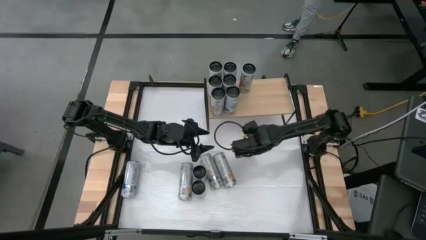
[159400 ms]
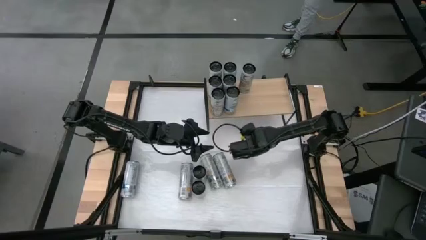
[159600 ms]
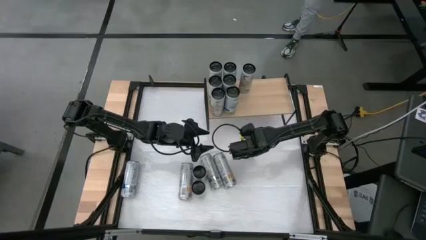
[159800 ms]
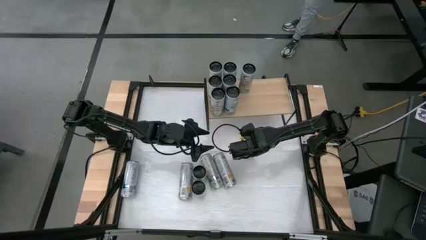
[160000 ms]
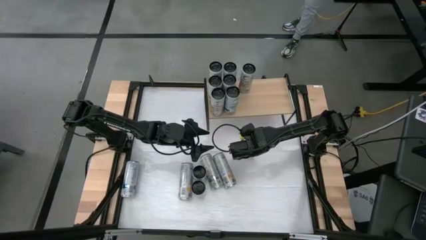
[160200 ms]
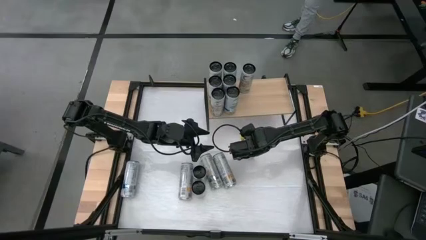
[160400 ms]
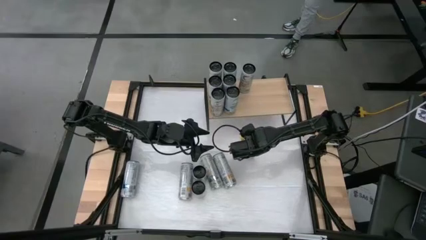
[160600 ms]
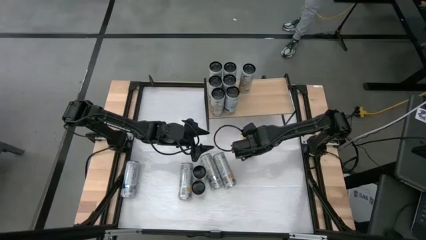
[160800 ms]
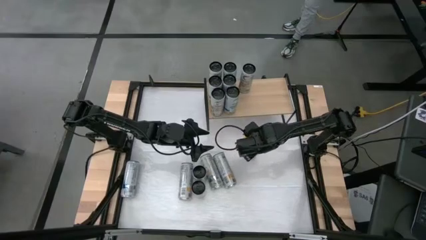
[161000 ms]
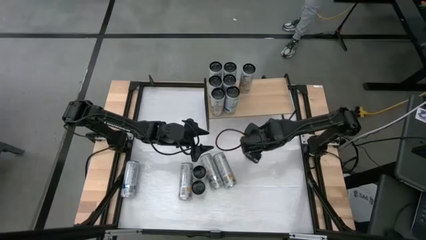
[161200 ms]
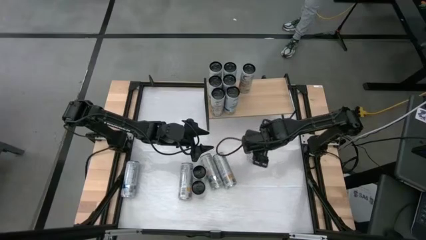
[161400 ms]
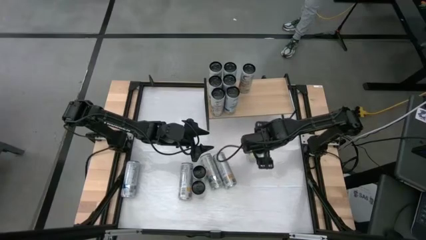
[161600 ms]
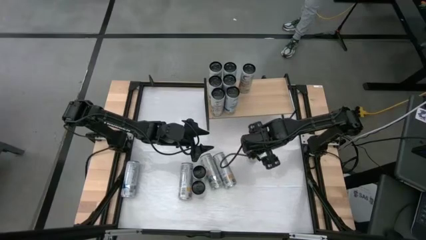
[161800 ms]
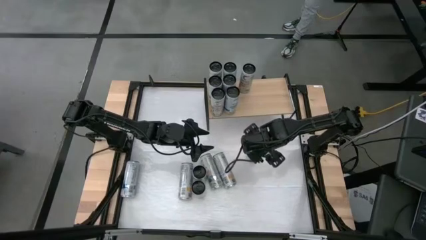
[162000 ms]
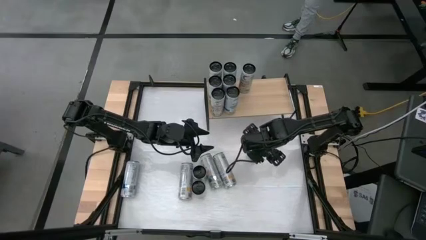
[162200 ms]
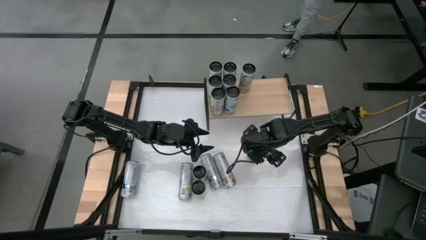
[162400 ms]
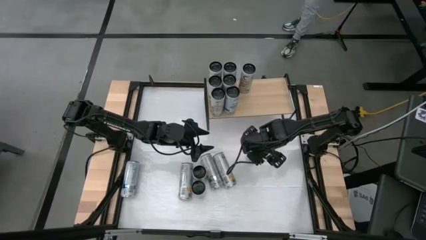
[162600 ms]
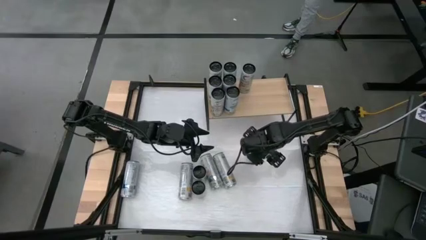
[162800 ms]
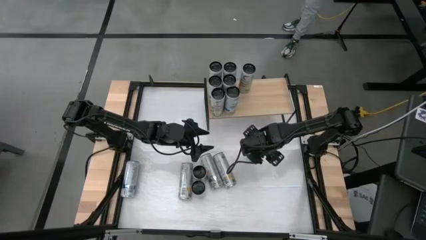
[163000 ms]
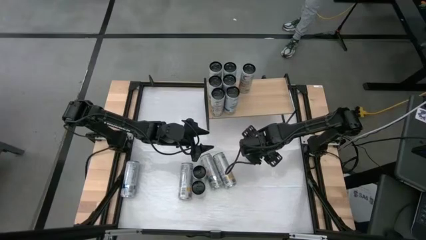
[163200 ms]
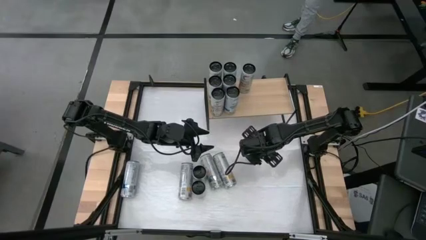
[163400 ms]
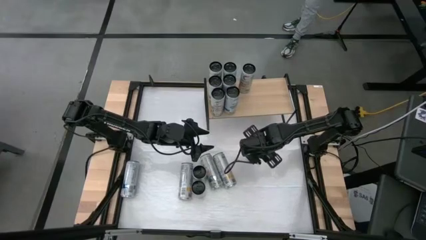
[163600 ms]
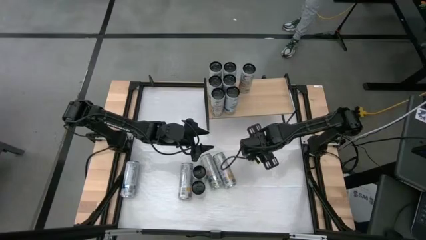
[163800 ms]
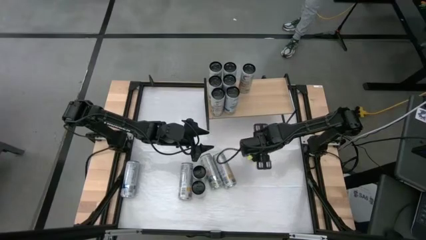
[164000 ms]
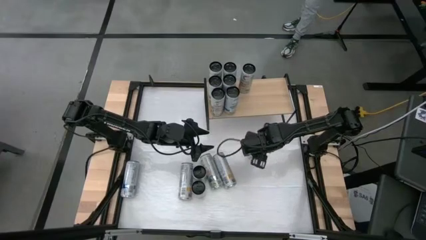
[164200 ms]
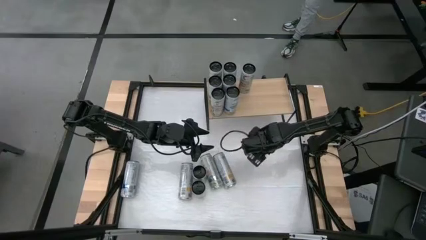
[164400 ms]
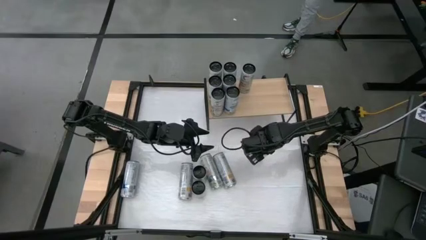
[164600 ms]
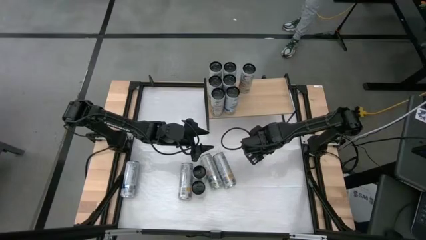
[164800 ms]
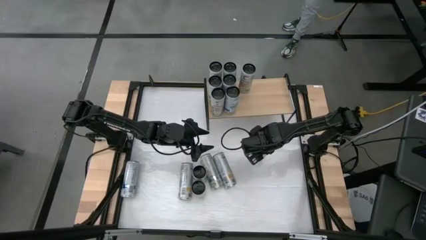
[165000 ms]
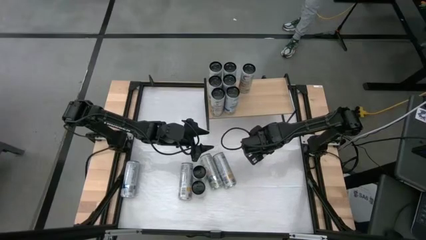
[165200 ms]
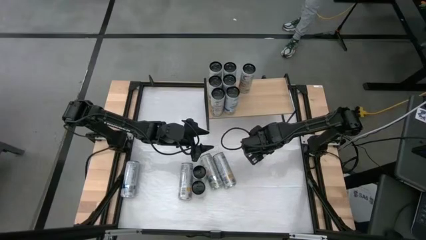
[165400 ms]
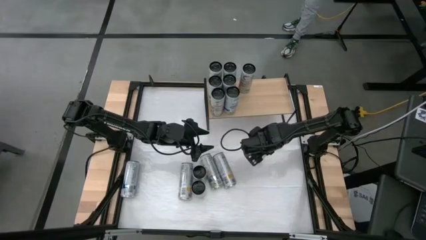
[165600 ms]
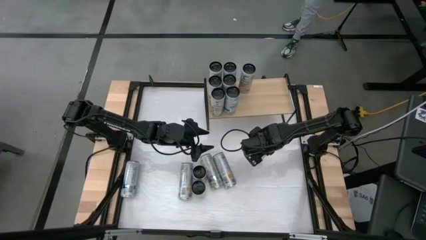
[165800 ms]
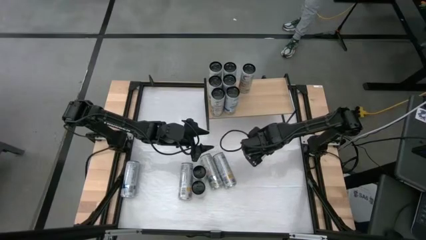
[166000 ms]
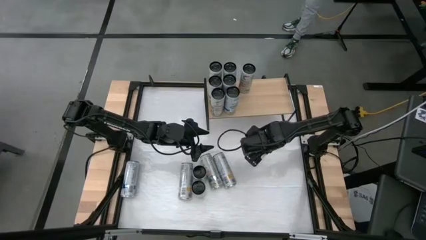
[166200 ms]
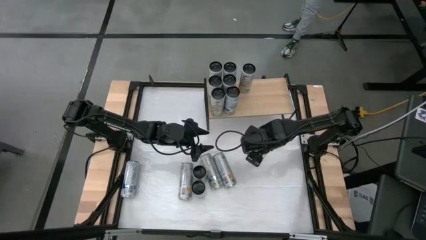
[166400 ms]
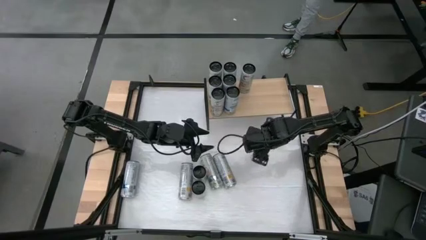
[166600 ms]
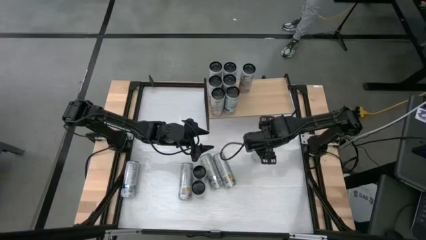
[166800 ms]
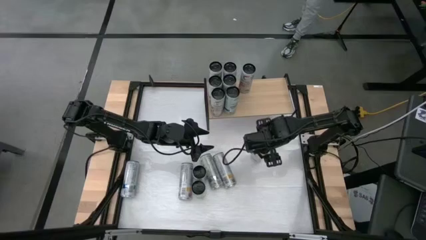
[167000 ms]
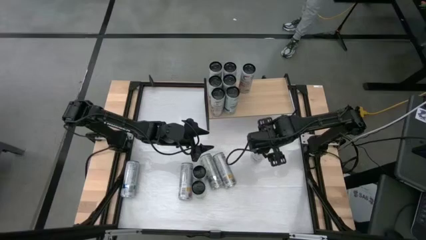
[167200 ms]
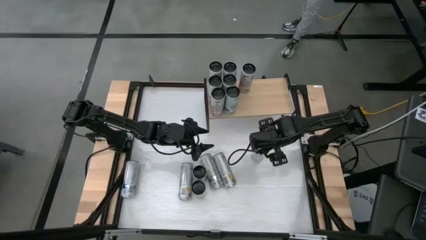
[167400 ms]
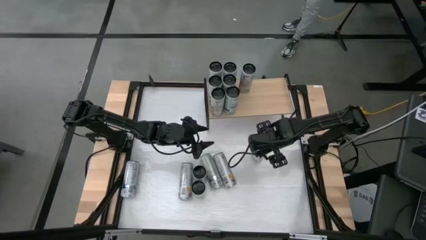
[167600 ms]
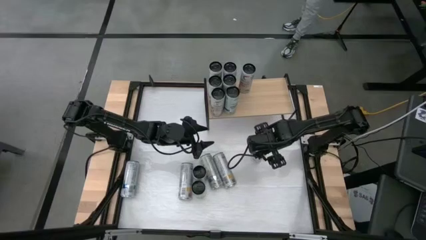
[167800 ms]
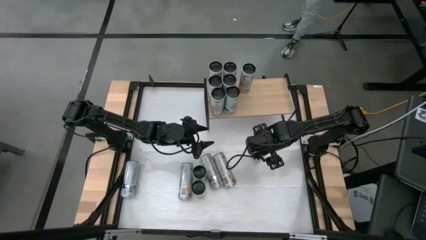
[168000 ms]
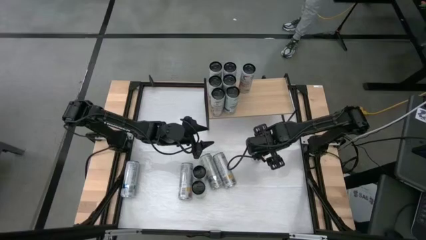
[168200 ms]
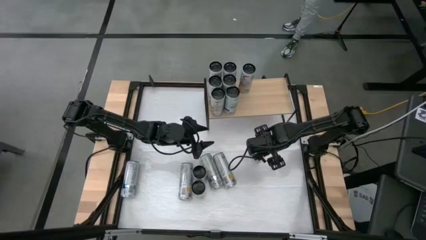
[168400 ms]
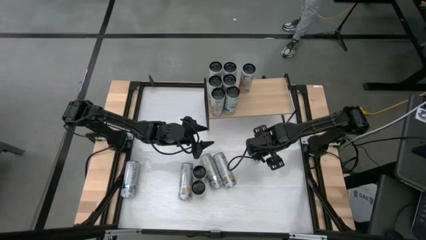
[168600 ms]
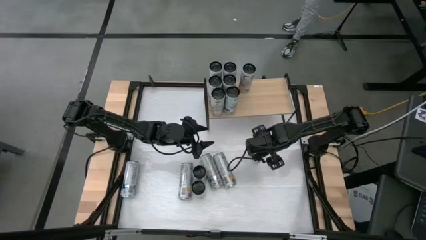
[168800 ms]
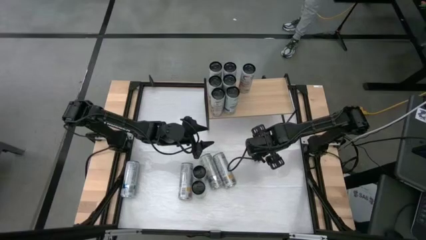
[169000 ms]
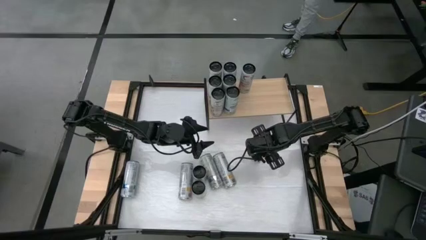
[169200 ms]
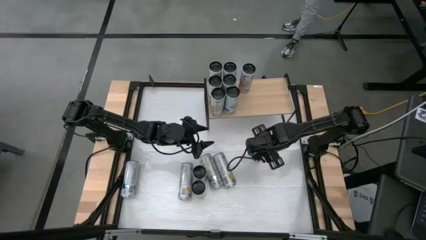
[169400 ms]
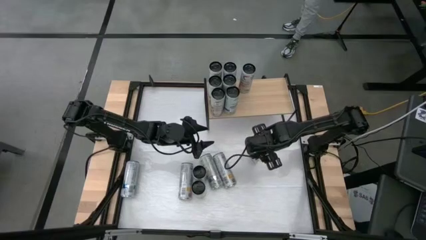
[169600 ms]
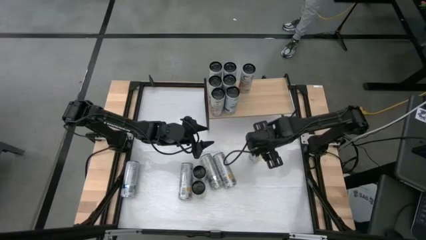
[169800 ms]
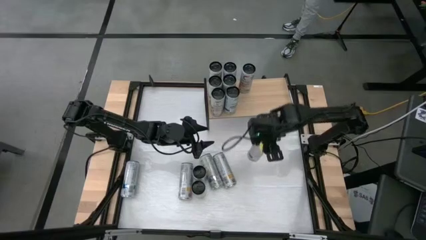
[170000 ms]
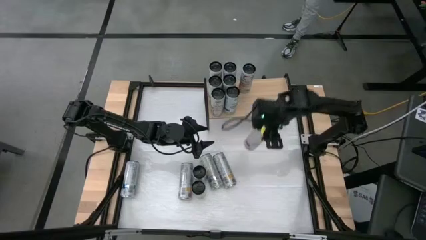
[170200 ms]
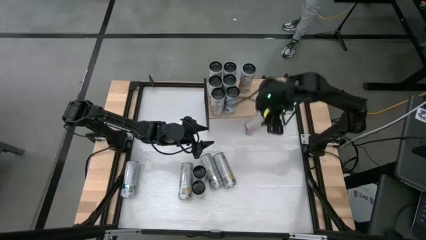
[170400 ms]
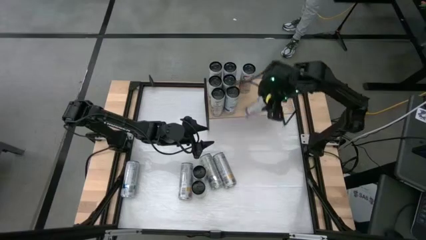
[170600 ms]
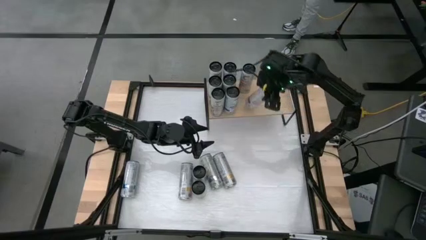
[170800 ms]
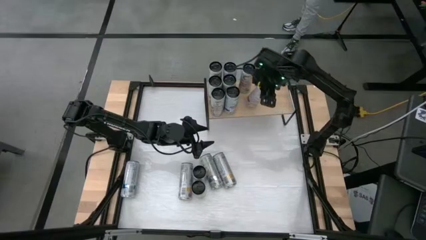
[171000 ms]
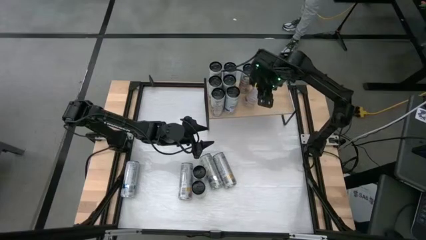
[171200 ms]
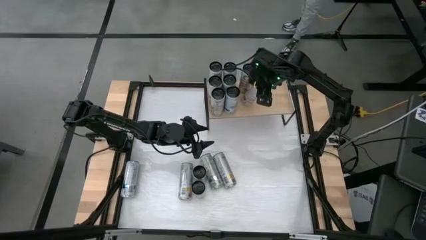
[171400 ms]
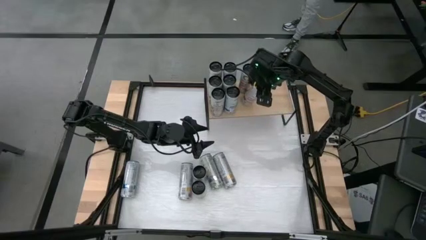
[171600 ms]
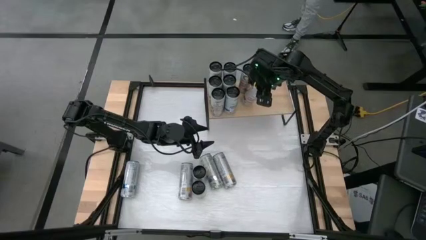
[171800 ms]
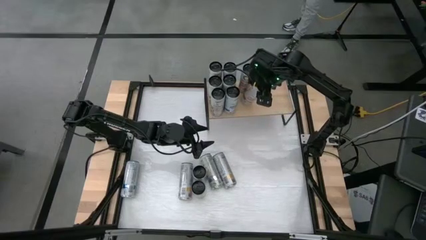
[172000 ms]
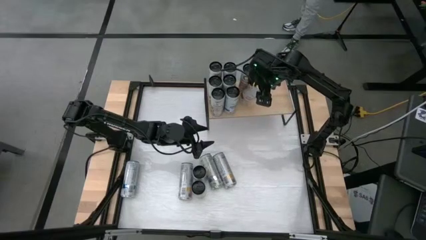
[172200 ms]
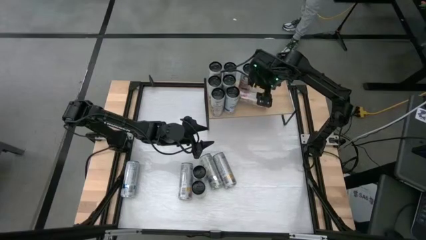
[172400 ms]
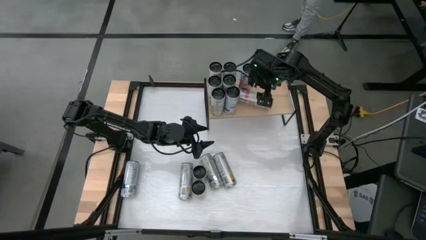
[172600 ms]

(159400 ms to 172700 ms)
Task: Place canned beverage on shelf
Put the pink soda can on the shelf aligned with the other pink soda can

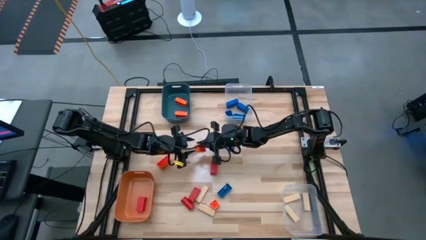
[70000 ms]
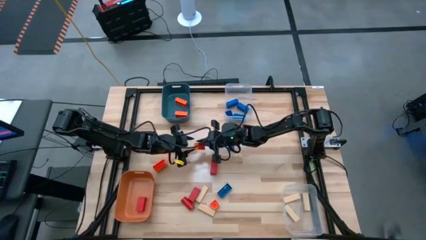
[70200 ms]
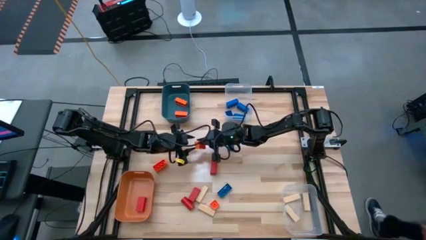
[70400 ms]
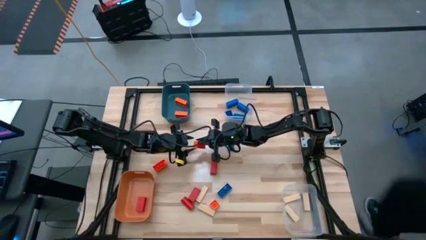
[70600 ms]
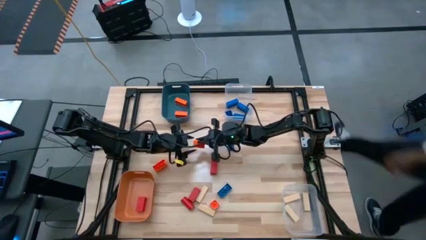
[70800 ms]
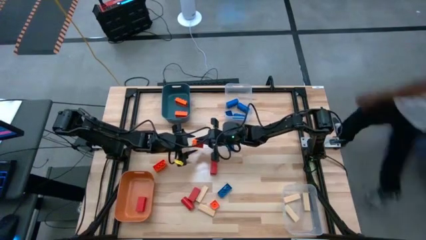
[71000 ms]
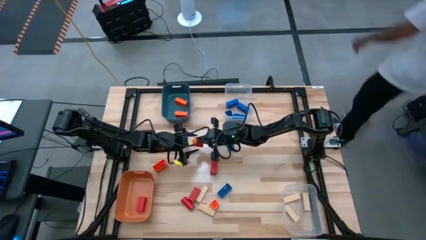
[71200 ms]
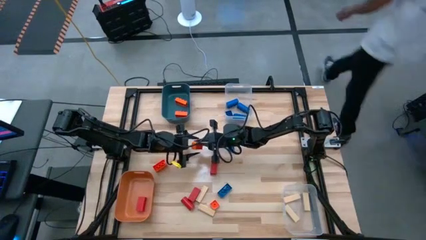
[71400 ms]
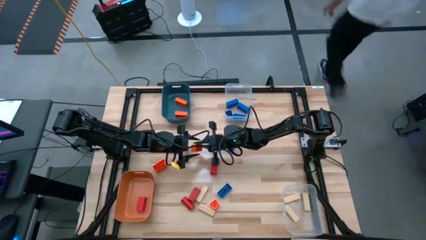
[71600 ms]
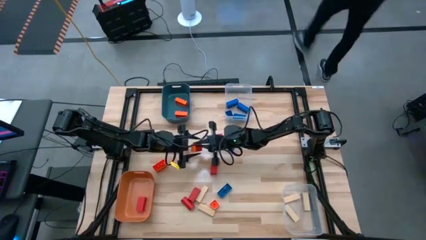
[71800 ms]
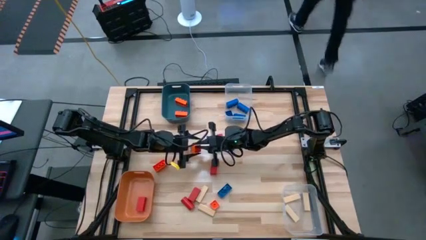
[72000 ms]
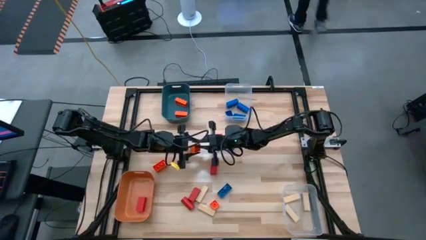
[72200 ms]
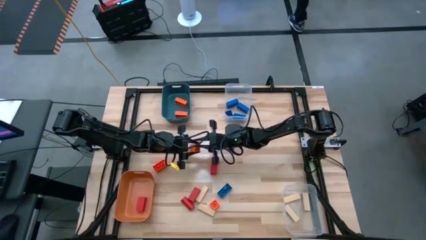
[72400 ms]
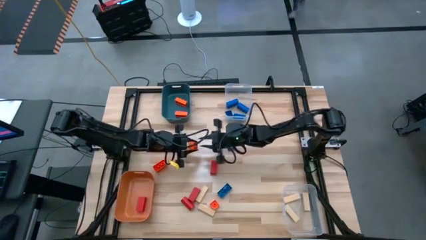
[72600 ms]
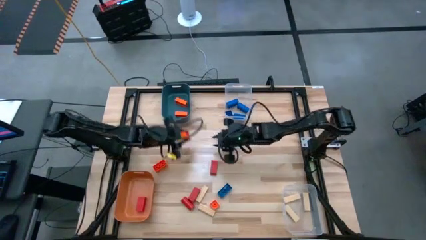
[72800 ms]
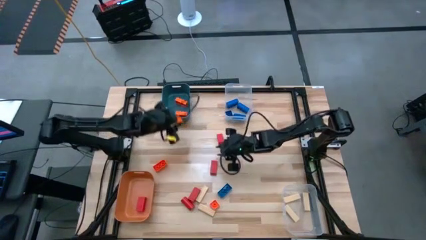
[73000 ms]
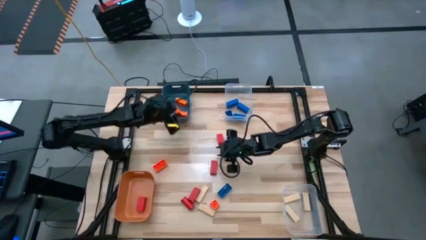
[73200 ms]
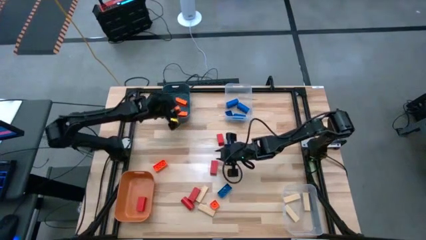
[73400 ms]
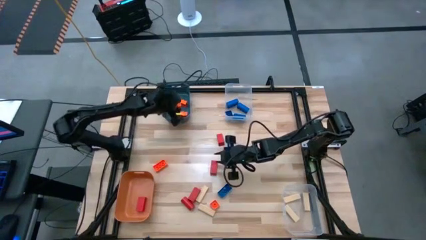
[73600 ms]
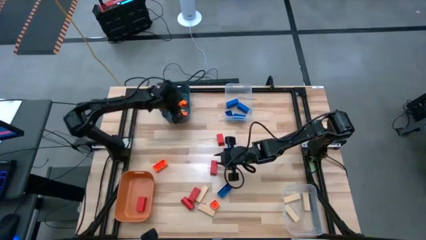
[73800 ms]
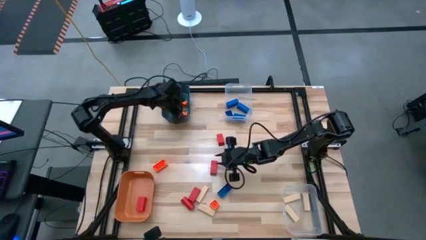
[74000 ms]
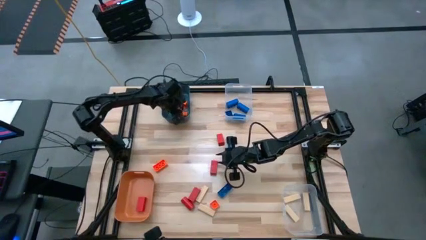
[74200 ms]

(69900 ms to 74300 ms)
Task: Sort blocks
Put the orange game piece into the blue bin
